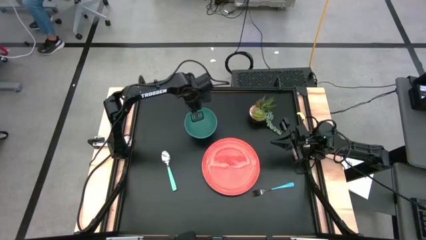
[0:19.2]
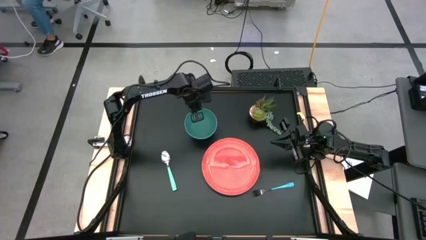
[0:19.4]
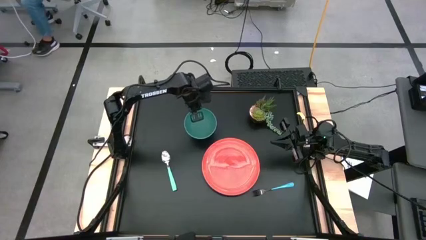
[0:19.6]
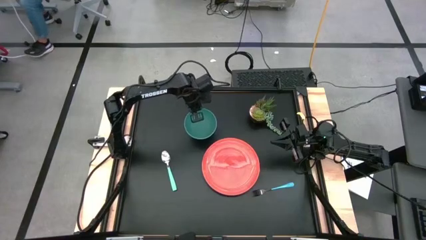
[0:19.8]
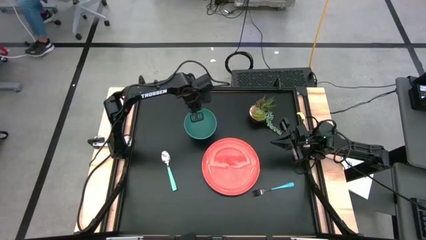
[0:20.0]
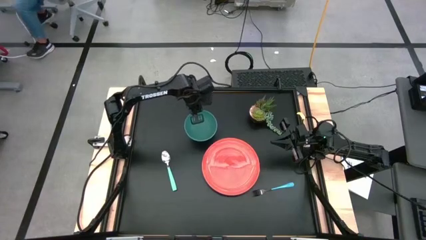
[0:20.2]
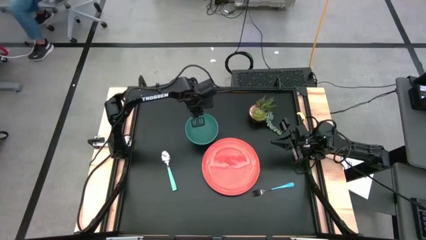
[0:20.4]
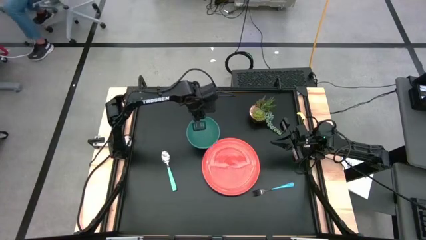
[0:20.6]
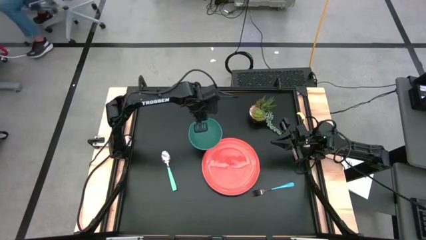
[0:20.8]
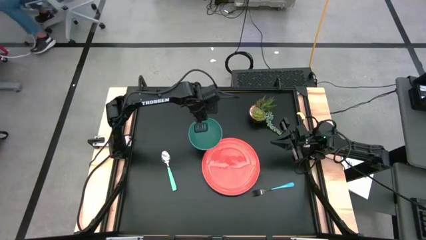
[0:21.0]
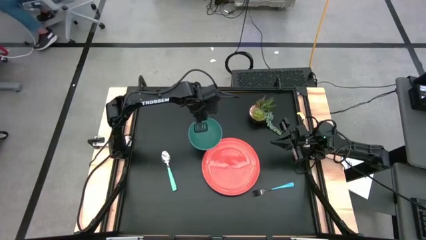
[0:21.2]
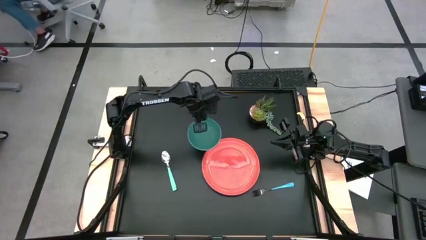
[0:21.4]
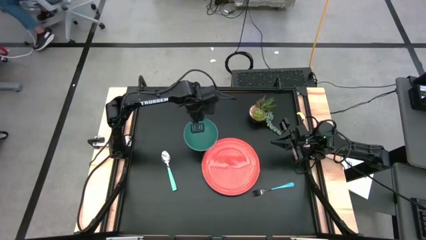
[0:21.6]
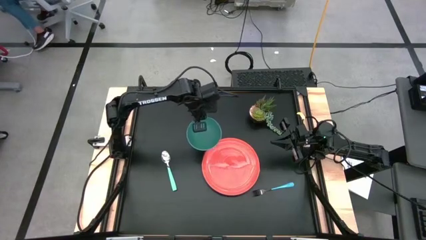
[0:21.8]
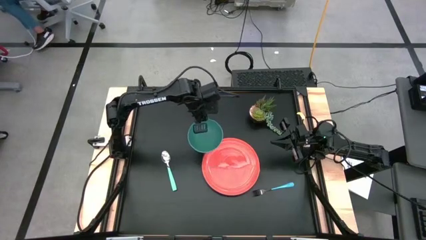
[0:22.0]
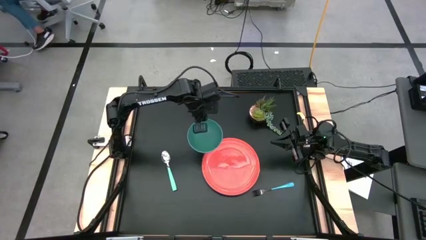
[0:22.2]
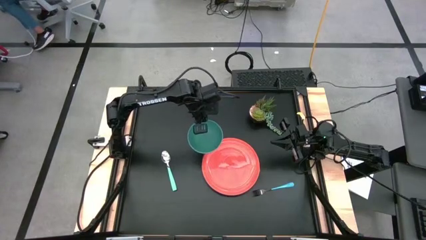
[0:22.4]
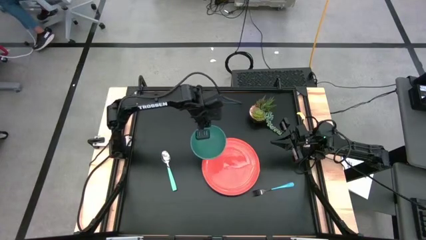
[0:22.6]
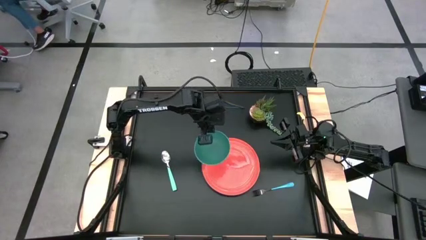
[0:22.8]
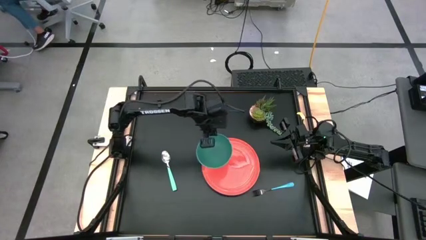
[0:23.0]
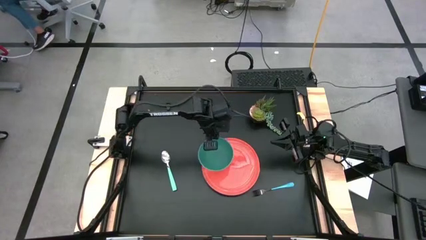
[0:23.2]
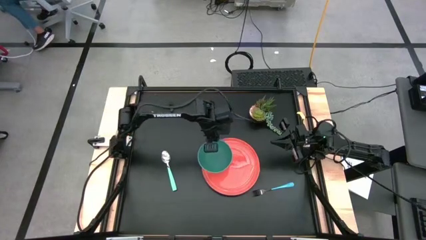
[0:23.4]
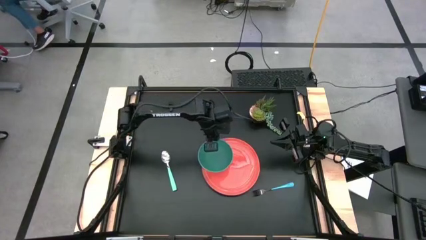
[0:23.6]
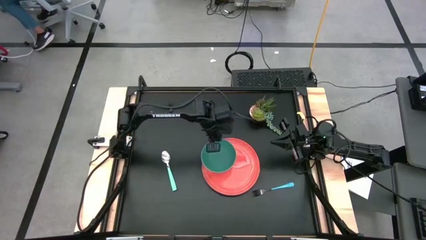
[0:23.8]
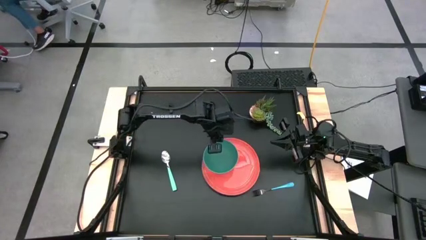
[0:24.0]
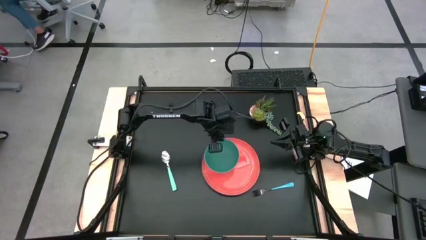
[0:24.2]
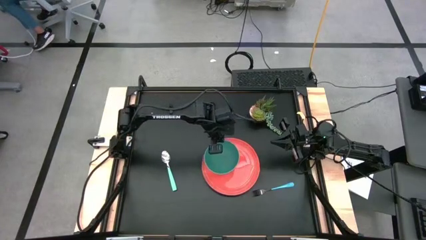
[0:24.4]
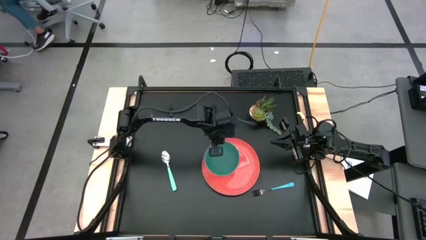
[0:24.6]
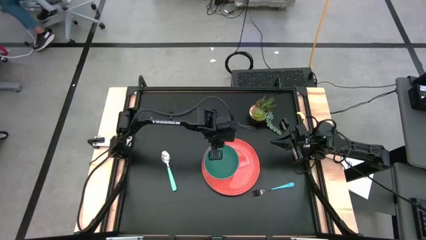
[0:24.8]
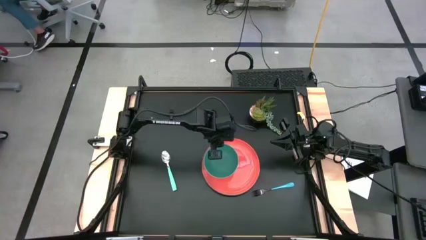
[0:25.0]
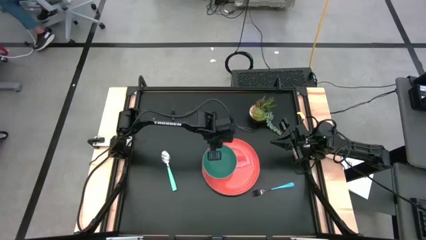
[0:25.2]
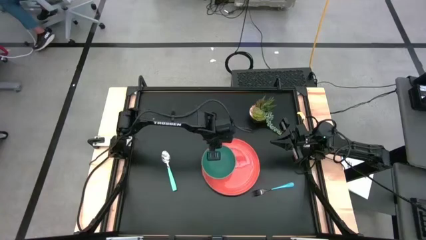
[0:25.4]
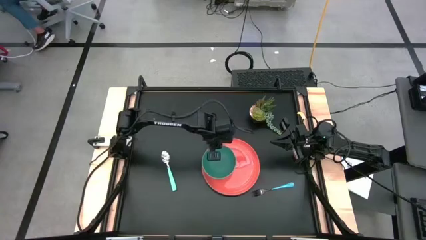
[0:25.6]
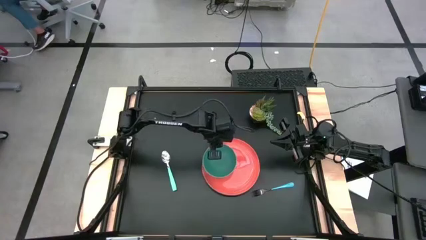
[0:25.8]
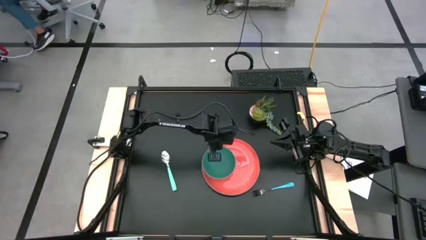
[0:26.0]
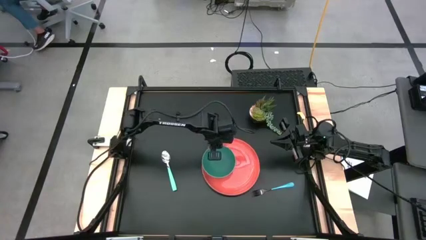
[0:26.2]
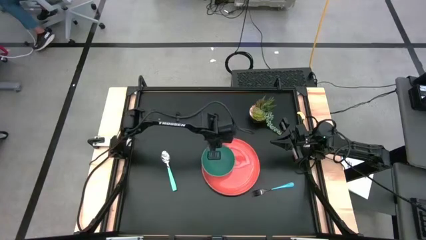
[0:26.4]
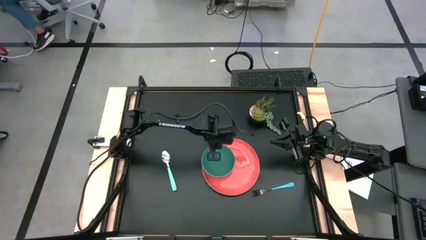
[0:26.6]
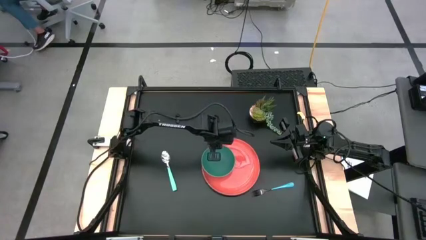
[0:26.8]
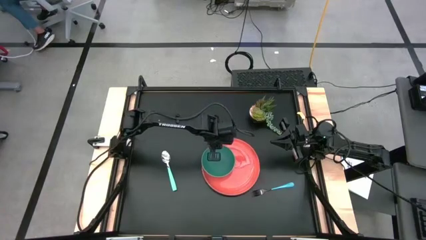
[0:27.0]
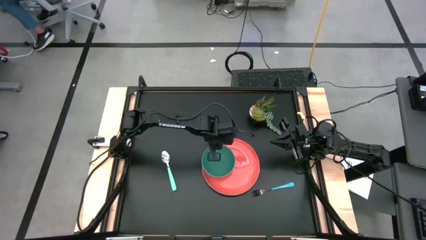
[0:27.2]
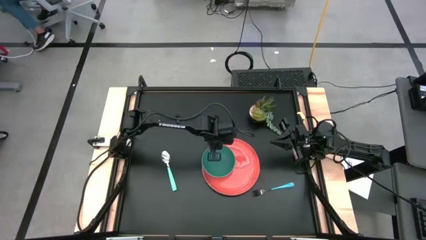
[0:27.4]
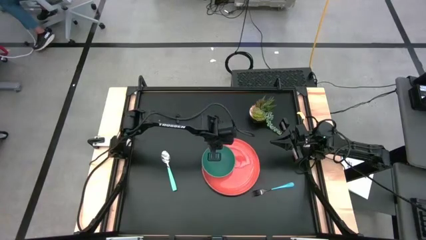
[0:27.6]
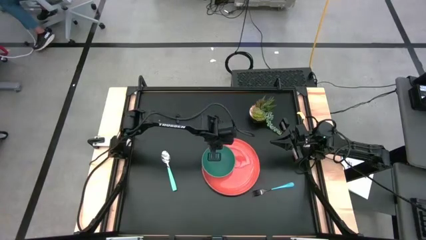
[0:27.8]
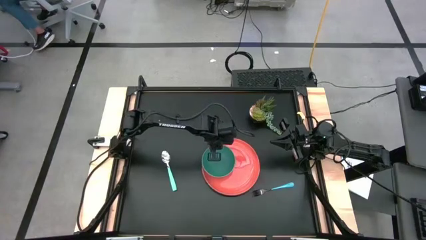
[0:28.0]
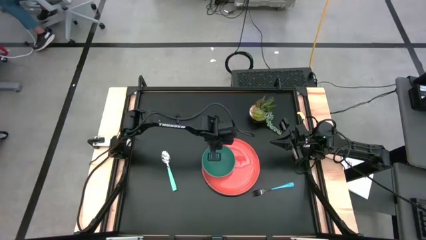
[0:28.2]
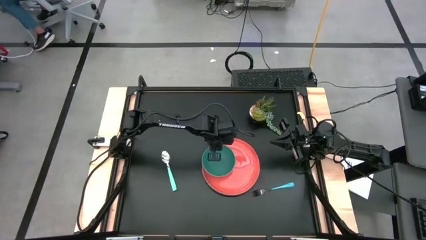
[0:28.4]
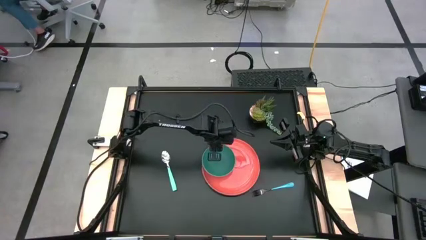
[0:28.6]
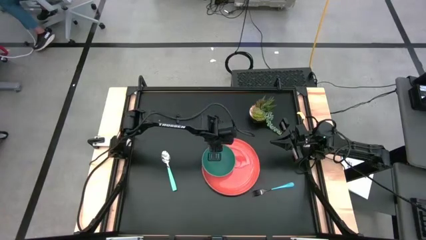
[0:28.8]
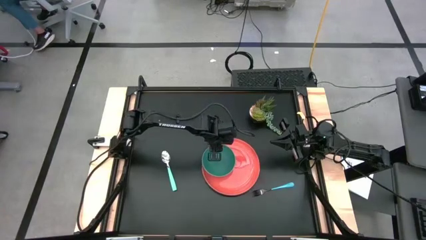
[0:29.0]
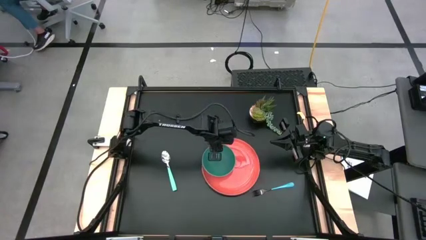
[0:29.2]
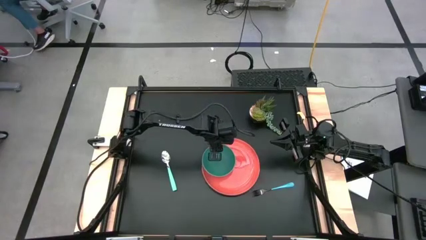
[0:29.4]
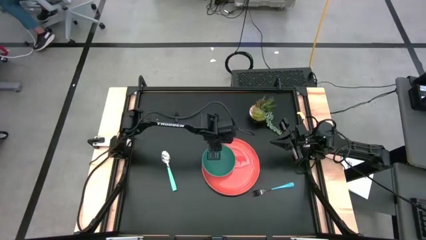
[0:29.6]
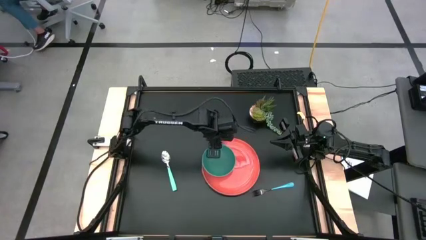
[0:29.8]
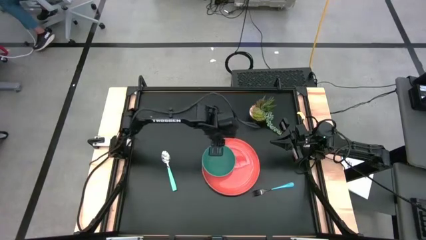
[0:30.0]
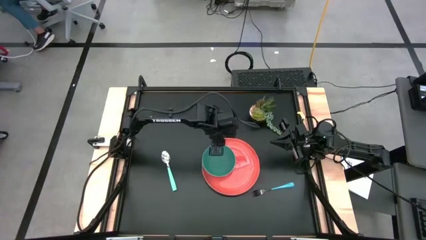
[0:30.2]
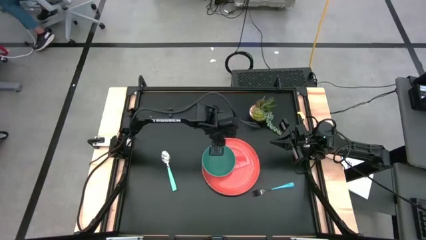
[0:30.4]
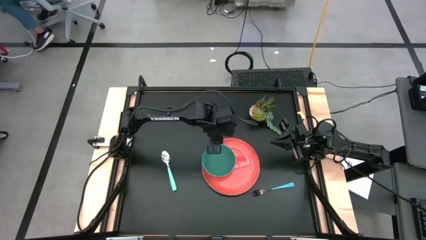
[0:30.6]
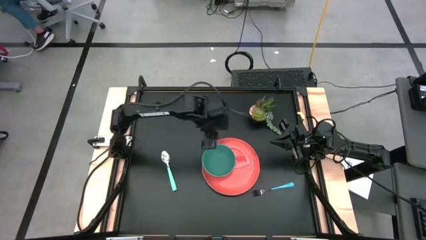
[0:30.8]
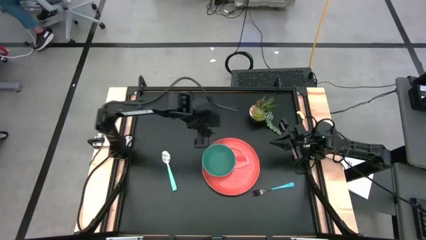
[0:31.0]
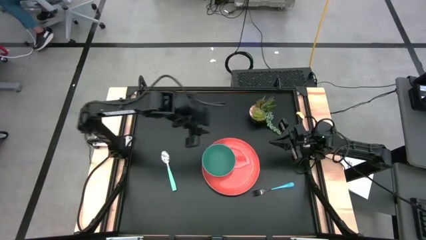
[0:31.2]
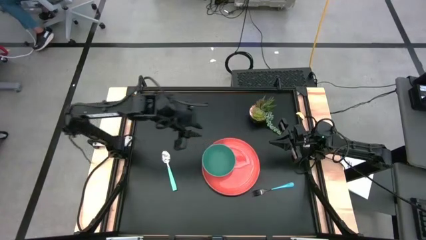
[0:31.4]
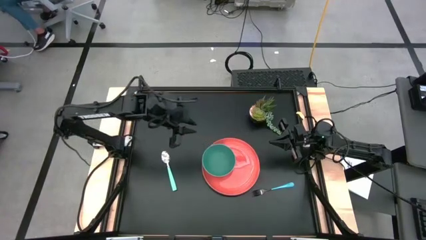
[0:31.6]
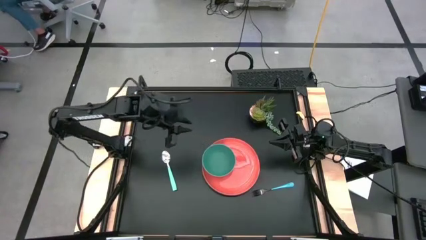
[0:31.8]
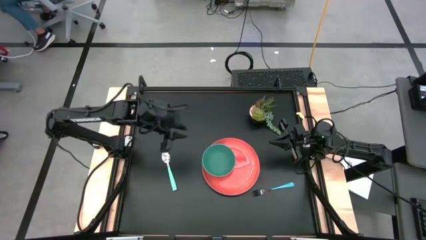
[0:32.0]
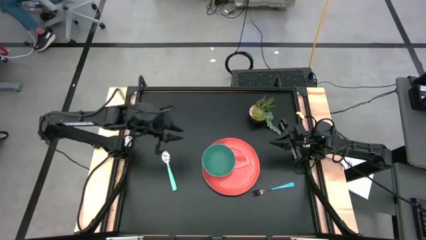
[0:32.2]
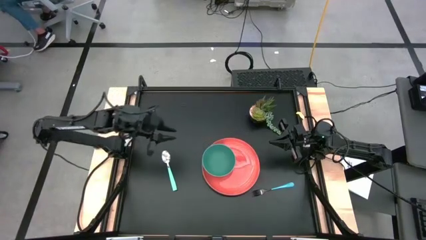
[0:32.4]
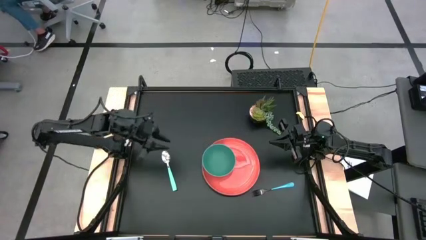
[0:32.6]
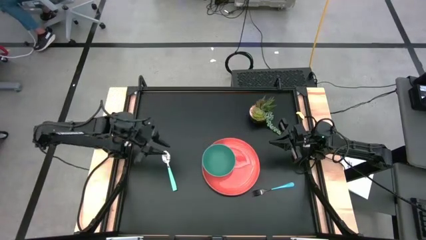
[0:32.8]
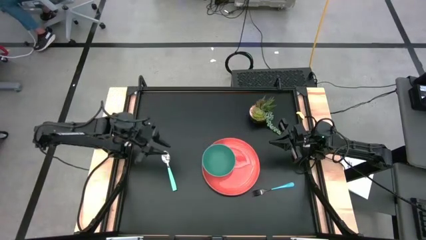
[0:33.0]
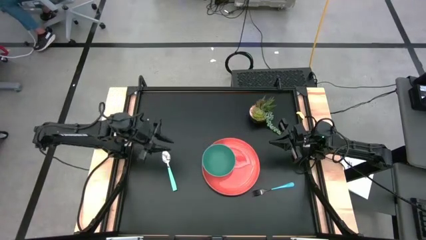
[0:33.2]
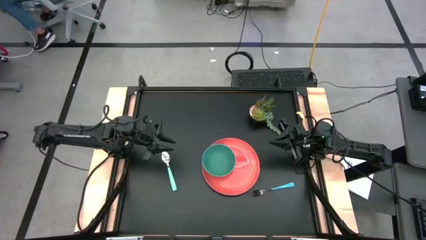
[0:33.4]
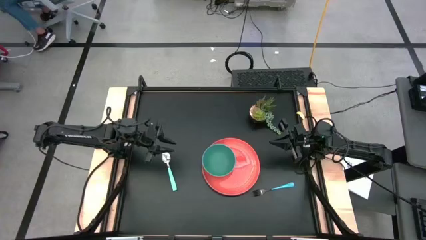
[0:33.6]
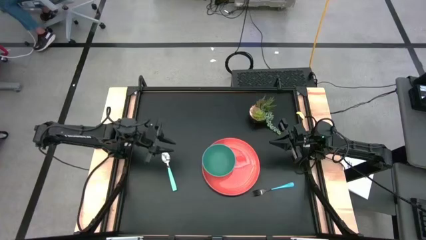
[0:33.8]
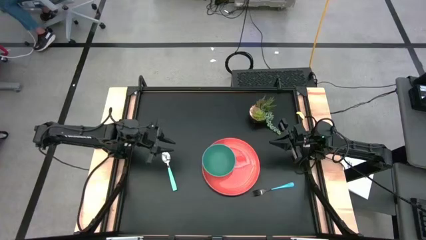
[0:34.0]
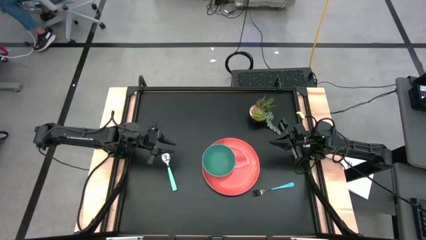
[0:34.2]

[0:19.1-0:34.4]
Task: Set table place
Put the green bowl on the orange plate
